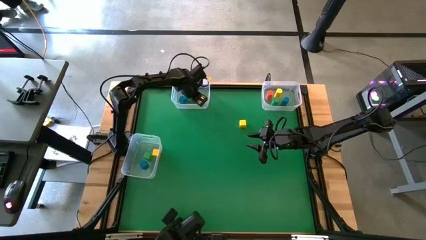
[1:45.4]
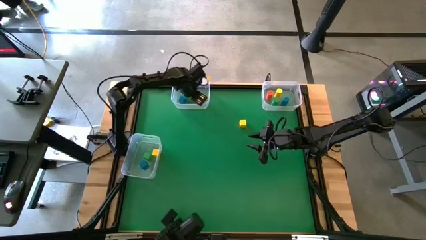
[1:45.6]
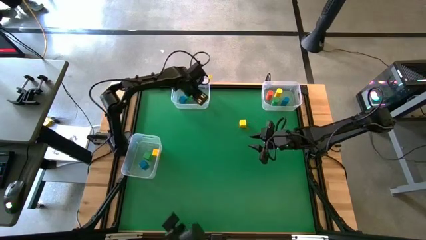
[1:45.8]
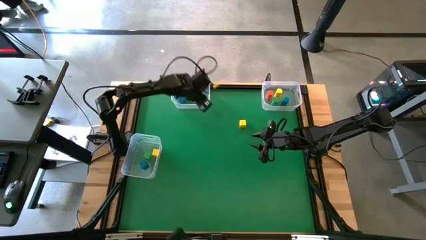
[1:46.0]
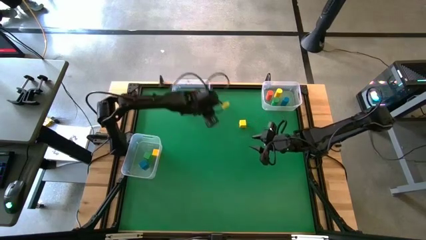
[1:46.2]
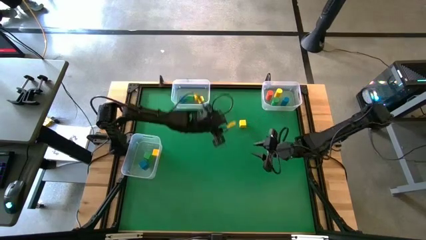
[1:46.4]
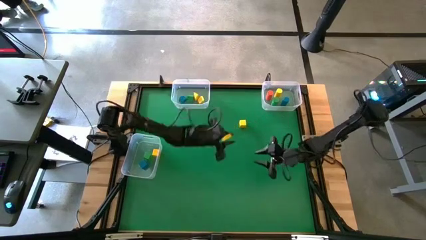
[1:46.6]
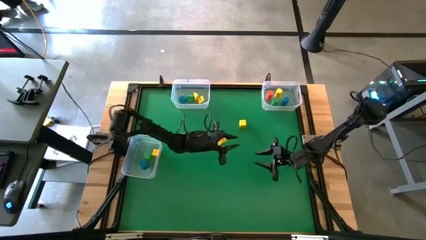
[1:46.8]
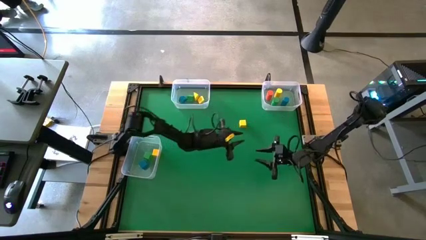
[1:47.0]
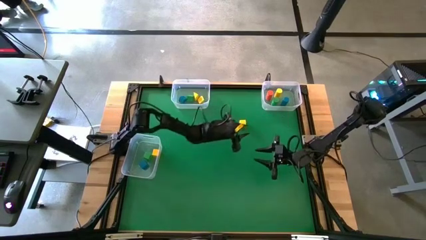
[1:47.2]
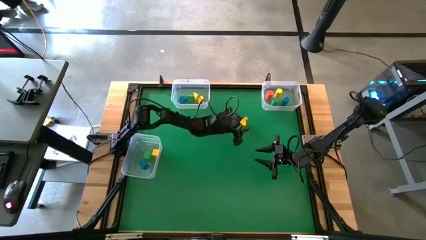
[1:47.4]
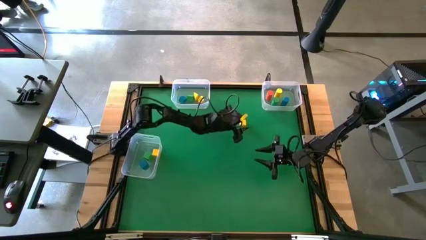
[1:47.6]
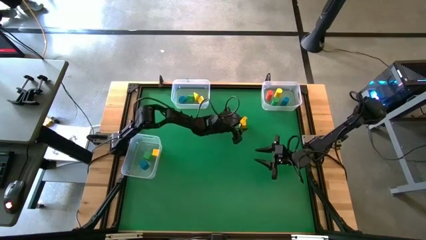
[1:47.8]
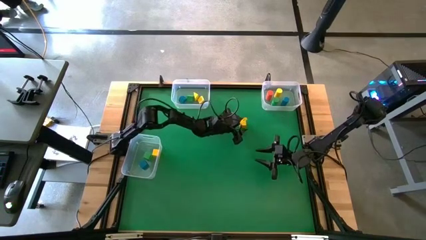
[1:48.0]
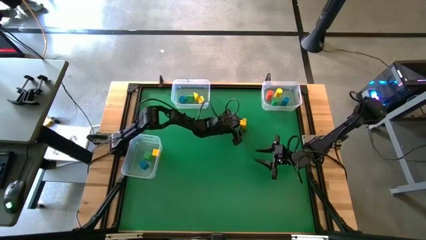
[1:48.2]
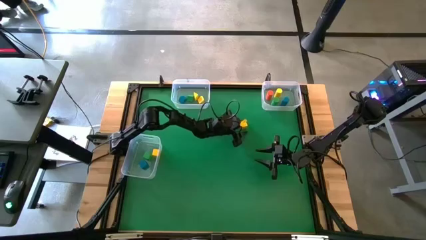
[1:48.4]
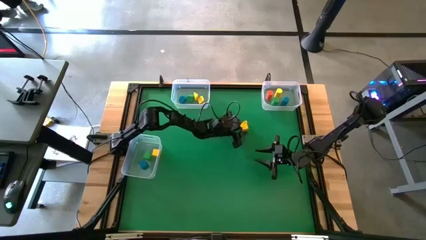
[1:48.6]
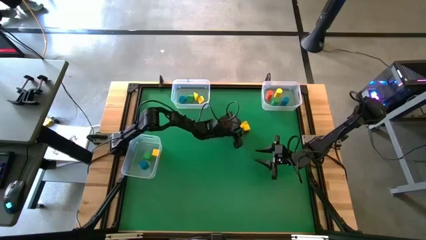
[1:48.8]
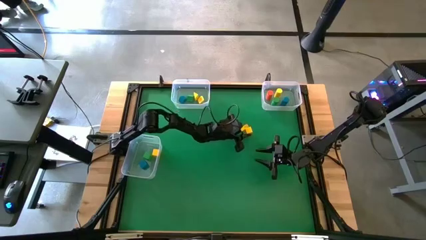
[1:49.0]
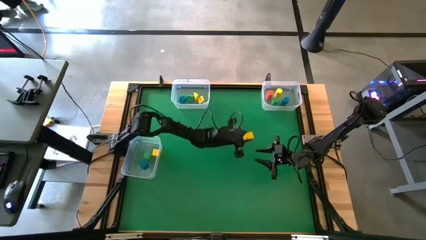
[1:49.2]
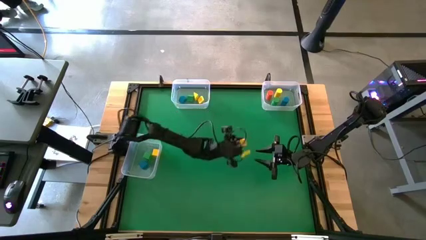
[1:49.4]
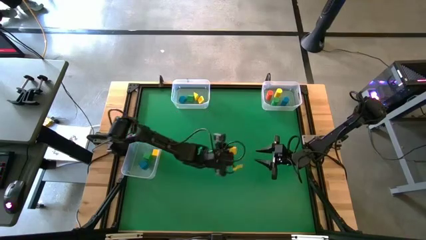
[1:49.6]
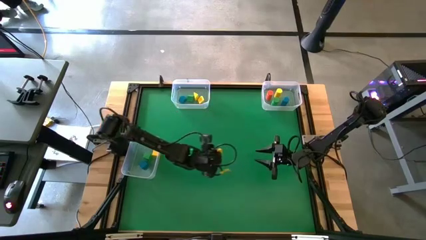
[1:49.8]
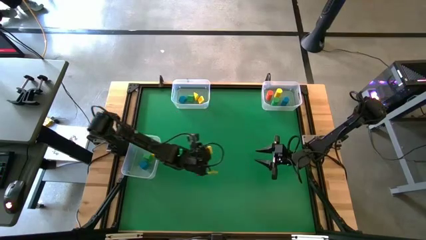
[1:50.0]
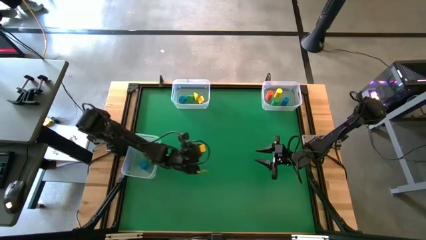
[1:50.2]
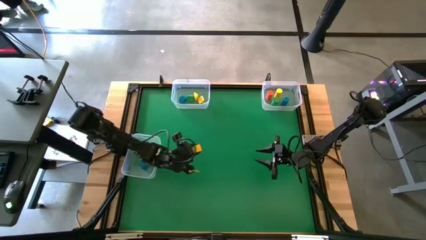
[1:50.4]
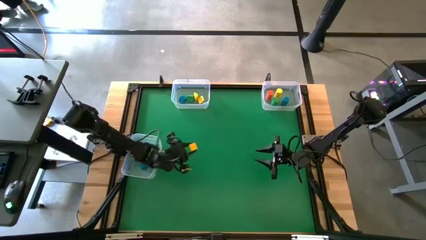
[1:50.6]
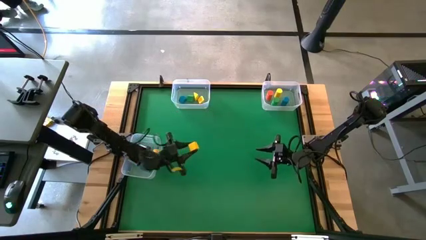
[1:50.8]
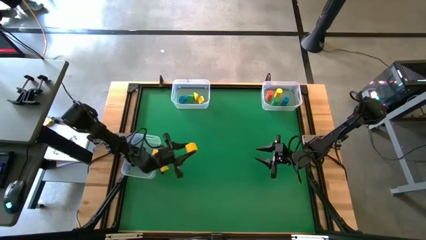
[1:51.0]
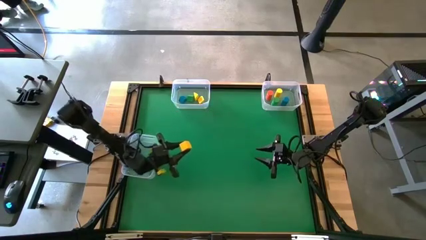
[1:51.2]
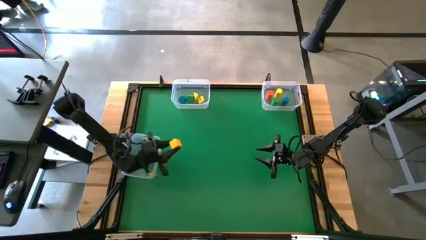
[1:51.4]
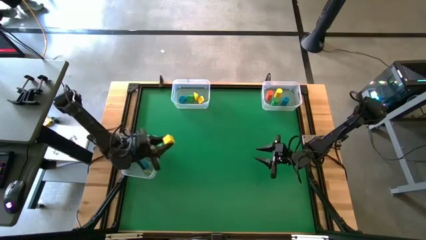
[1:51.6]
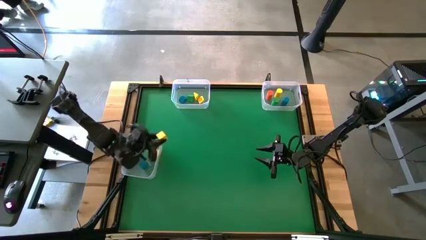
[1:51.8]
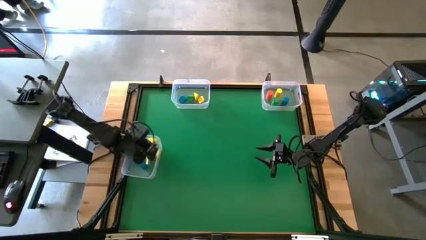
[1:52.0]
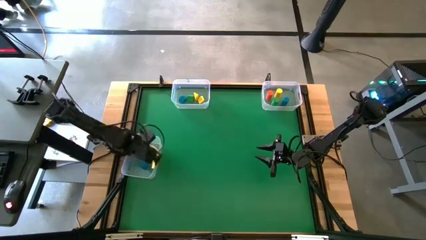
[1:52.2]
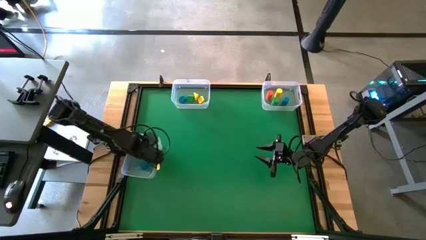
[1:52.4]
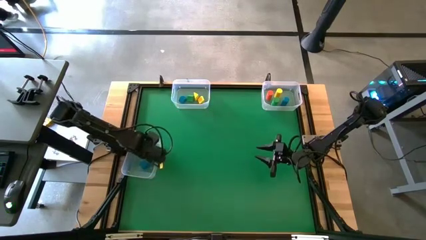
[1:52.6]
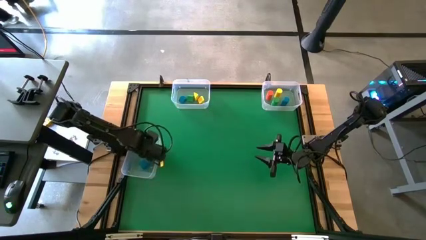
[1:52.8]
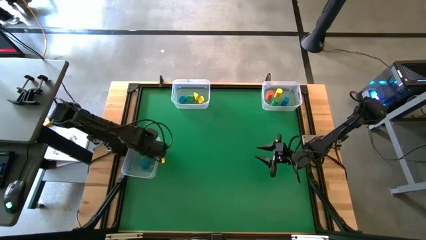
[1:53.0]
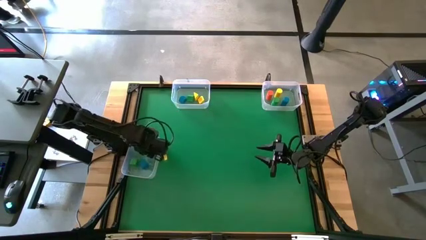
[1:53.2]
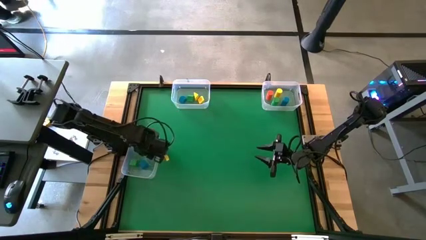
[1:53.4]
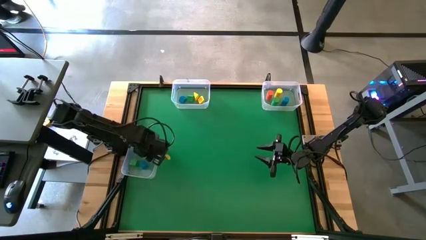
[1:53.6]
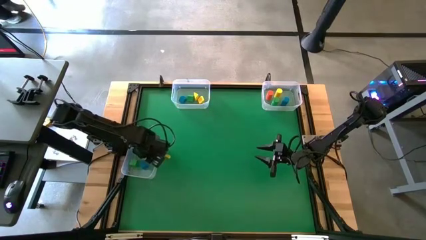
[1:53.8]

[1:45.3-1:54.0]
Task: Sort blocks by size
Put the yellow square block into the bottom transparent bin

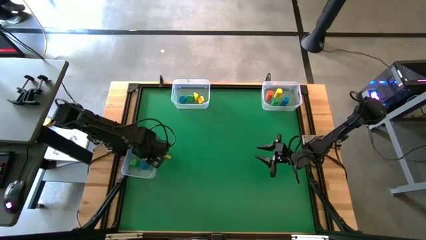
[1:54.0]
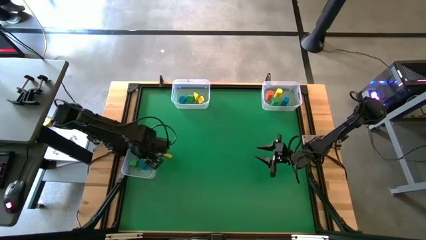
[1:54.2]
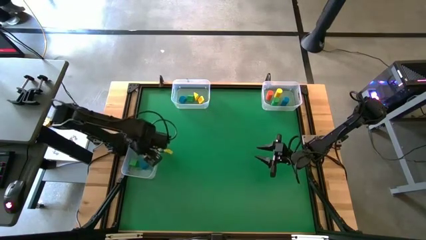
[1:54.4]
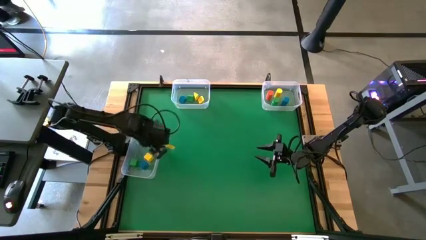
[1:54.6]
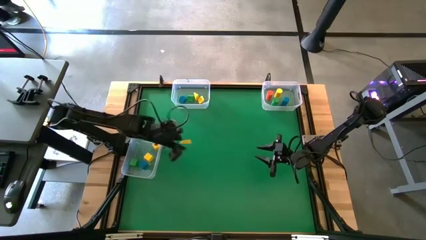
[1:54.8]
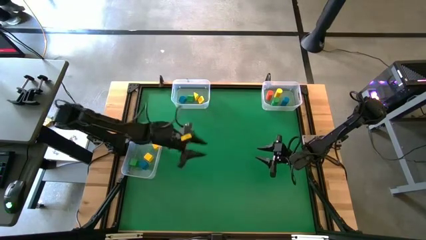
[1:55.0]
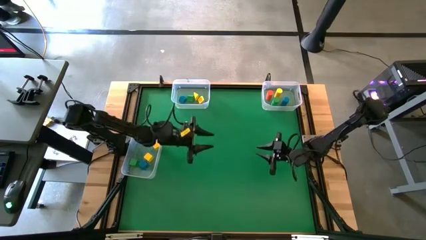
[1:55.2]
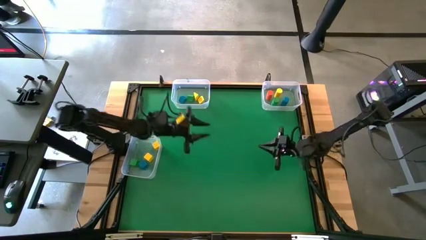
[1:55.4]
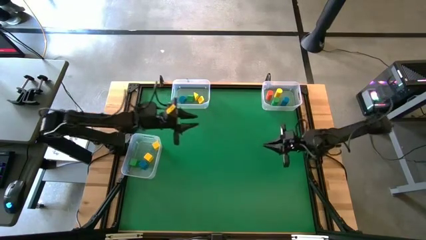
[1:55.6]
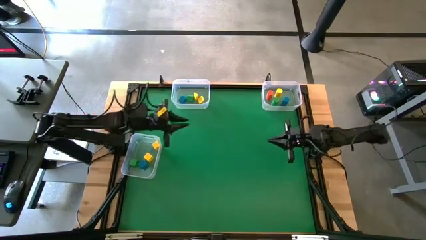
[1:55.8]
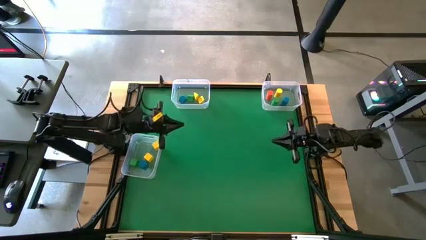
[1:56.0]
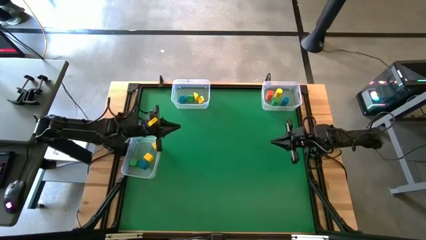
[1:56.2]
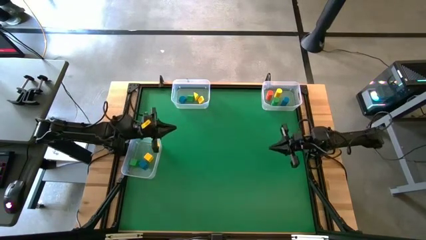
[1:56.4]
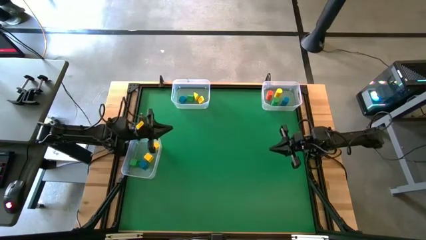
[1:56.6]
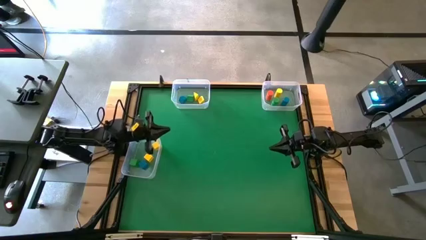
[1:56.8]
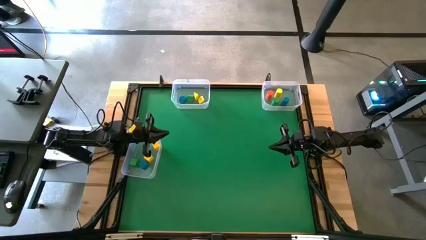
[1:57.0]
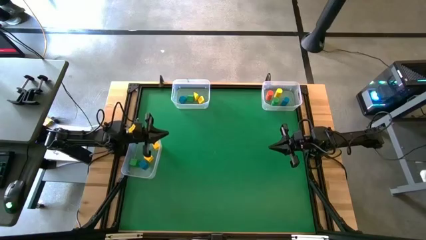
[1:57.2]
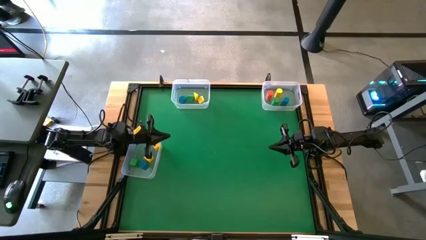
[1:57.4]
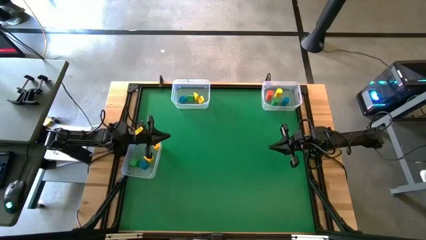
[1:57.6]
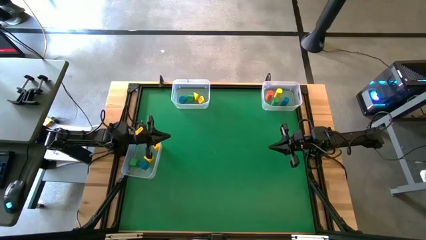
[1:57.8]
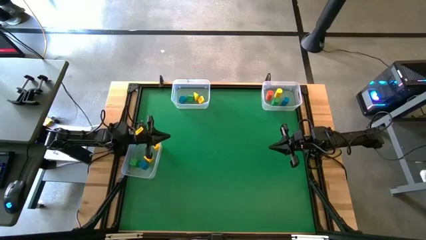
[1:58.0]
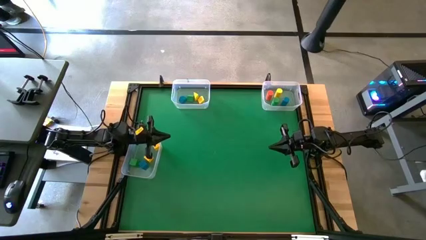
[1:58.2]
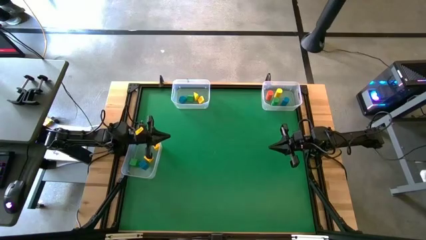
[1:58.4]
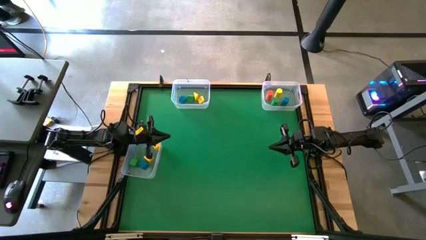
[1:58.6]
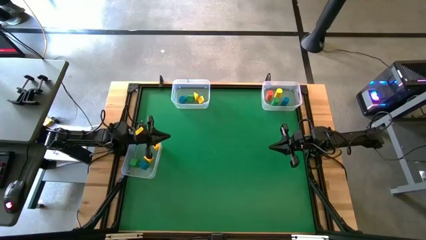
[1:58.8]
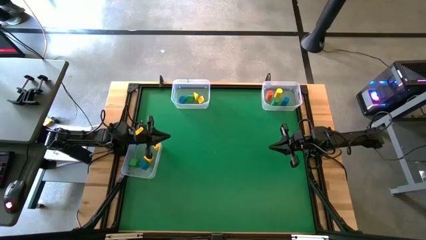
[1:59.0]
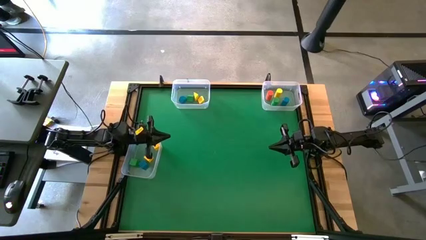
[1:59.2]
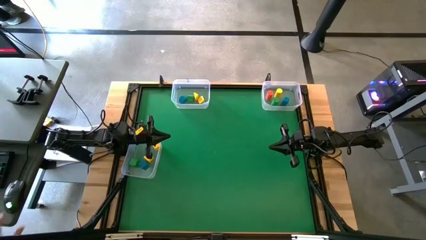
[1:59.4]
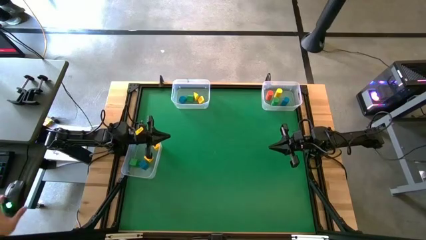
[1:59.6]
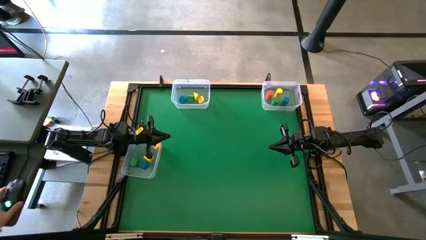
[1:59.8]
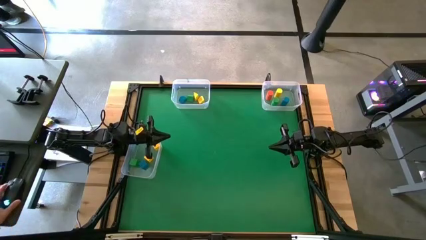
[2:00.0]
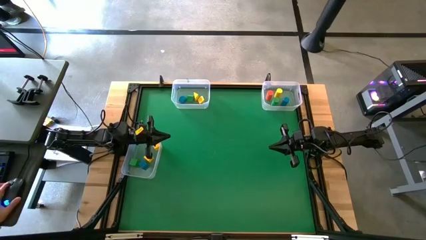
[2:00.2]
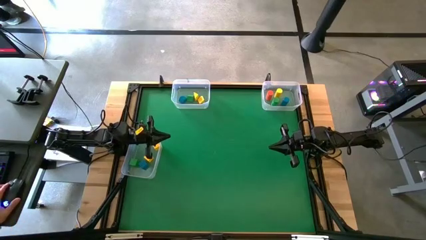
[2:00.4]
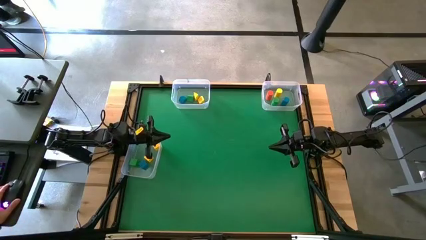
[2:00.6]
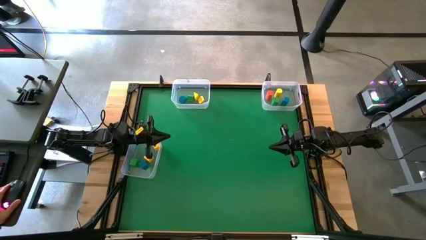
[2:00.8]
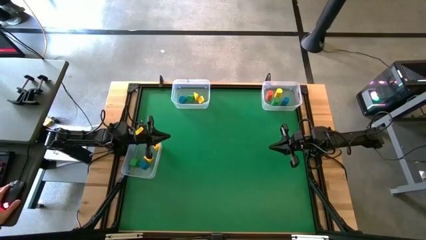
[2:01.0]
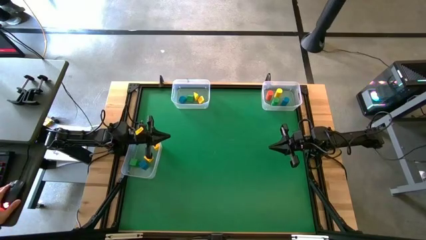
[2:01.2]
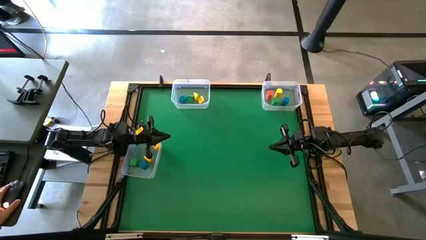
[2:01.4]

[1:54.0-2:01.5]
Return to Home Position
